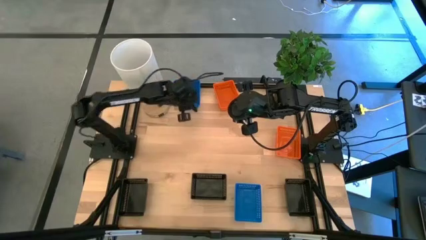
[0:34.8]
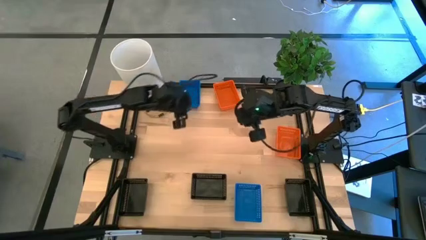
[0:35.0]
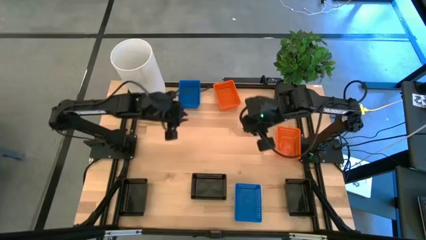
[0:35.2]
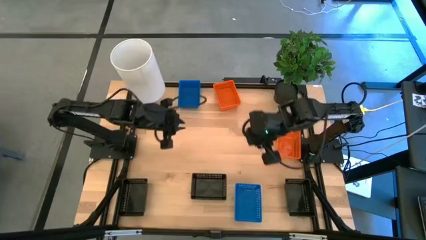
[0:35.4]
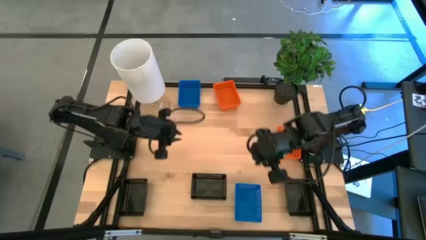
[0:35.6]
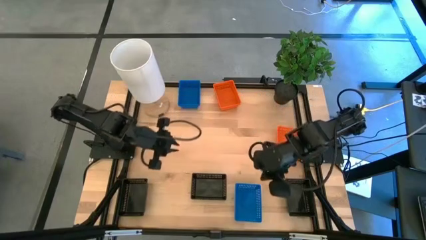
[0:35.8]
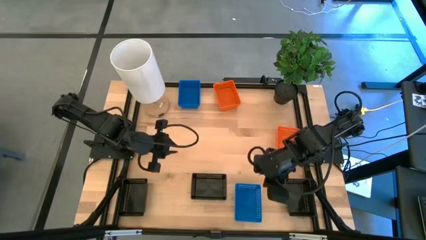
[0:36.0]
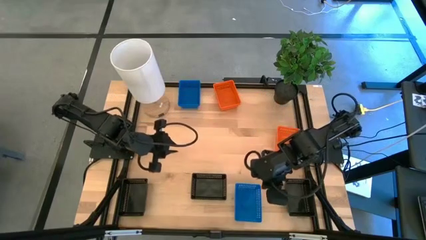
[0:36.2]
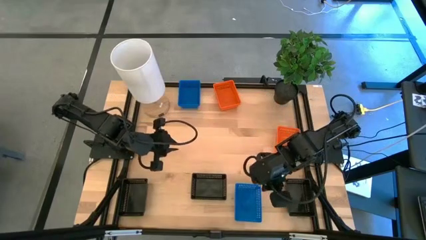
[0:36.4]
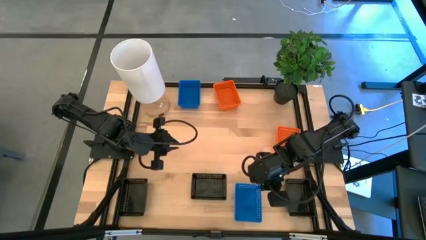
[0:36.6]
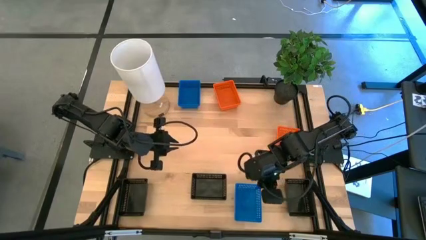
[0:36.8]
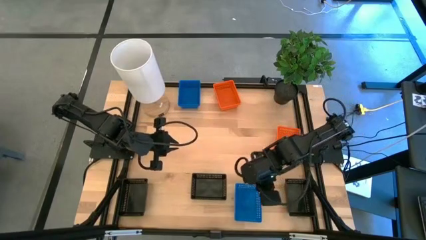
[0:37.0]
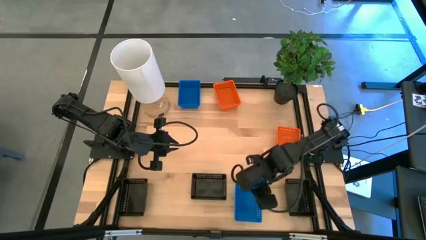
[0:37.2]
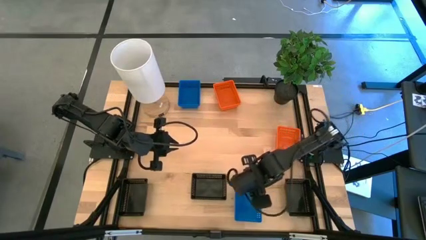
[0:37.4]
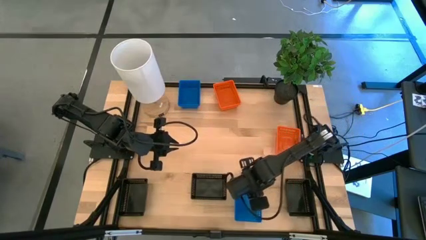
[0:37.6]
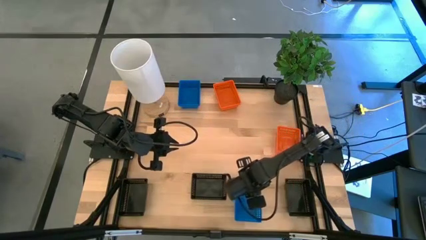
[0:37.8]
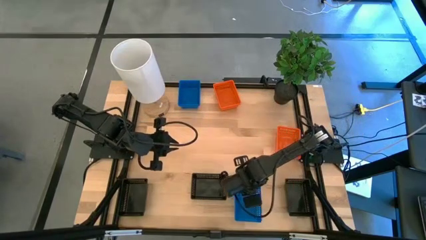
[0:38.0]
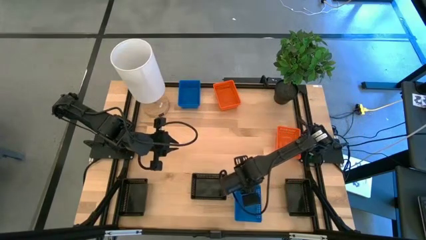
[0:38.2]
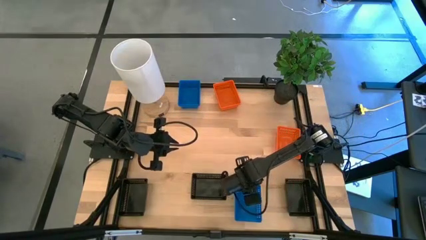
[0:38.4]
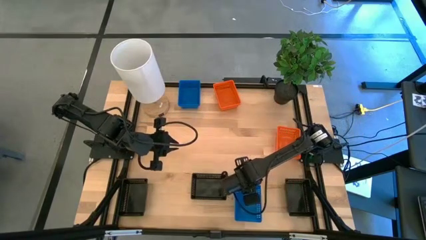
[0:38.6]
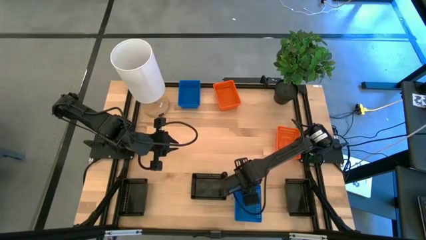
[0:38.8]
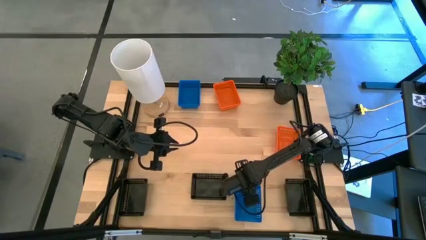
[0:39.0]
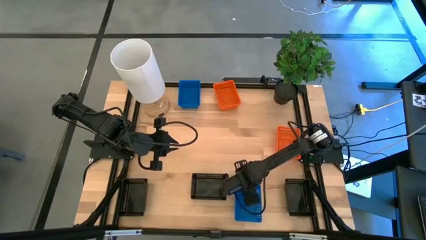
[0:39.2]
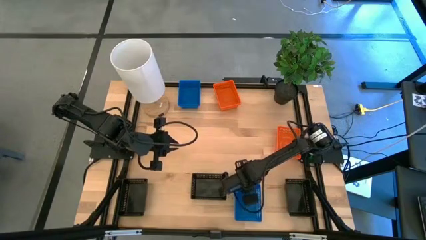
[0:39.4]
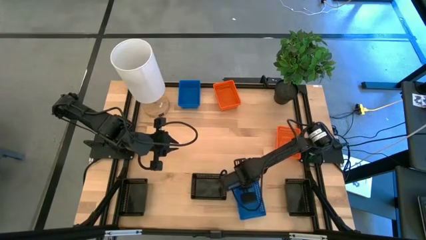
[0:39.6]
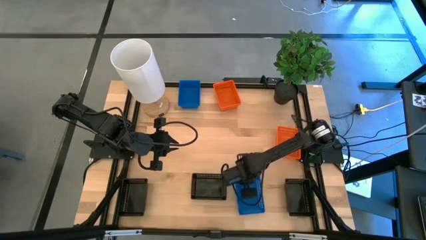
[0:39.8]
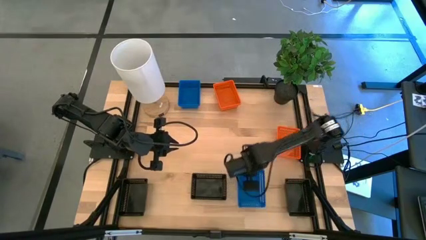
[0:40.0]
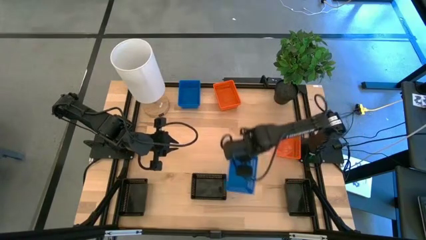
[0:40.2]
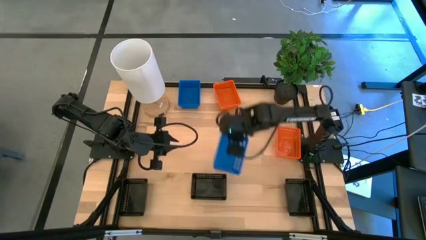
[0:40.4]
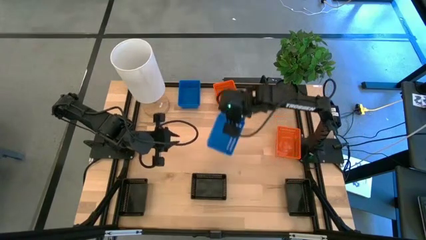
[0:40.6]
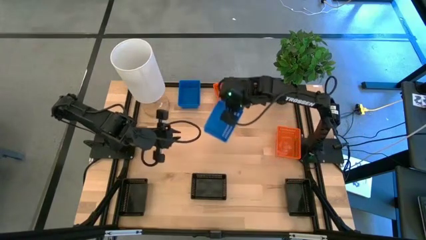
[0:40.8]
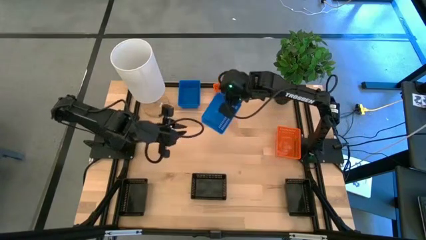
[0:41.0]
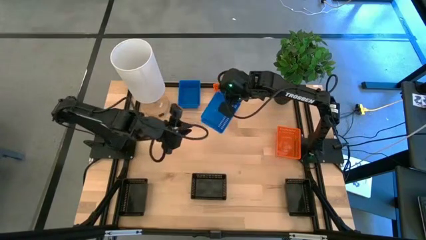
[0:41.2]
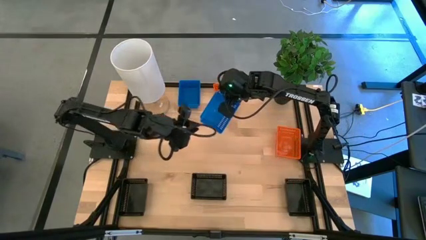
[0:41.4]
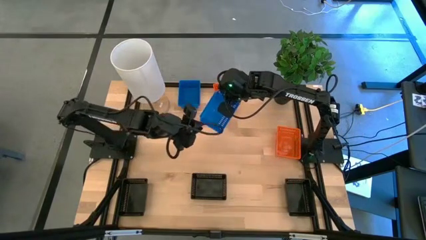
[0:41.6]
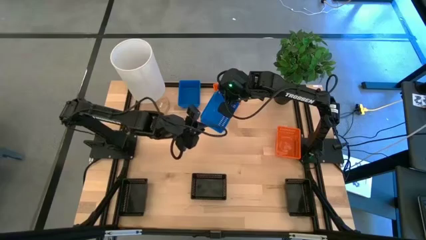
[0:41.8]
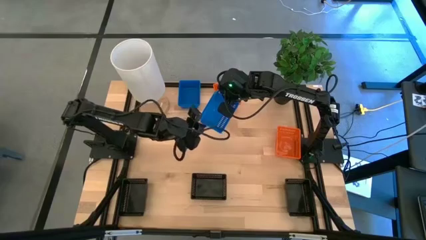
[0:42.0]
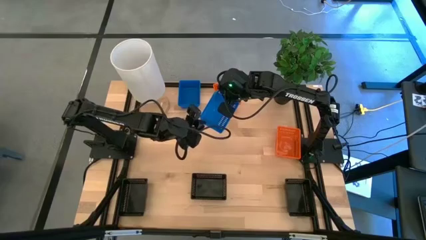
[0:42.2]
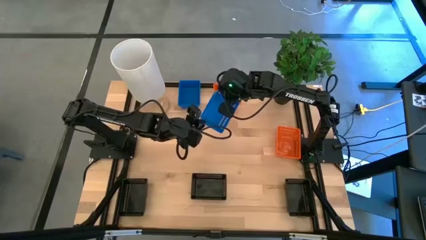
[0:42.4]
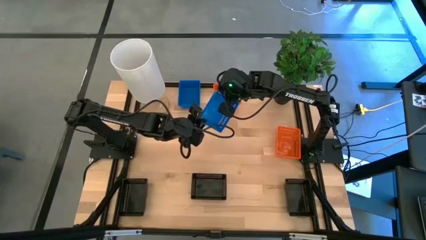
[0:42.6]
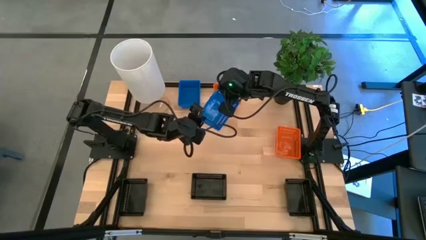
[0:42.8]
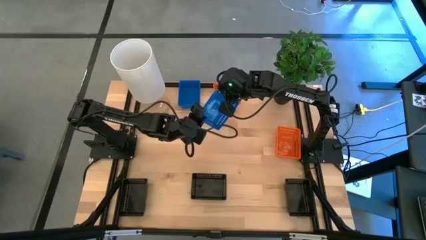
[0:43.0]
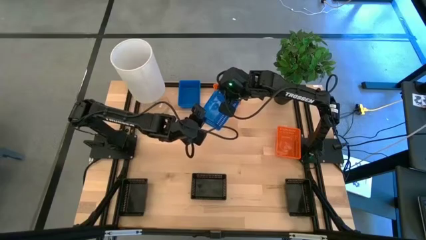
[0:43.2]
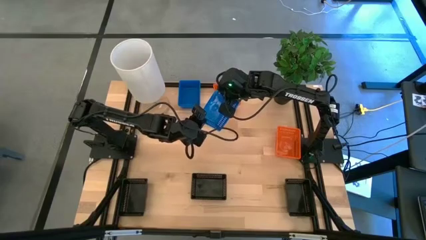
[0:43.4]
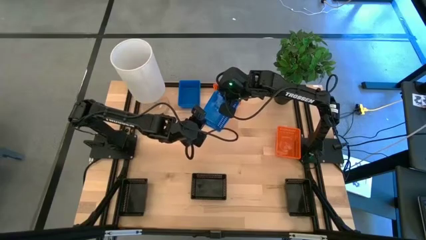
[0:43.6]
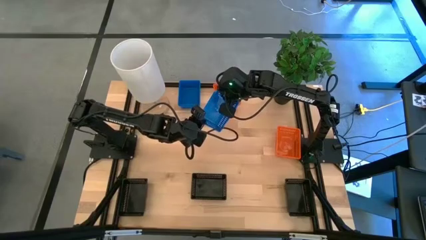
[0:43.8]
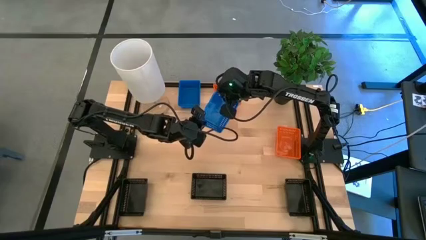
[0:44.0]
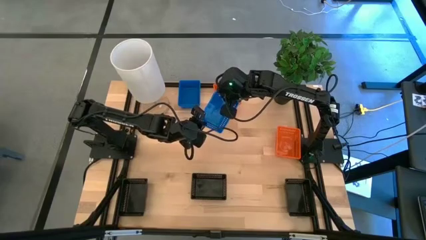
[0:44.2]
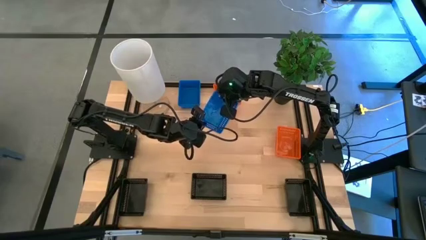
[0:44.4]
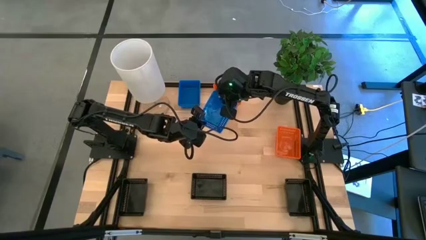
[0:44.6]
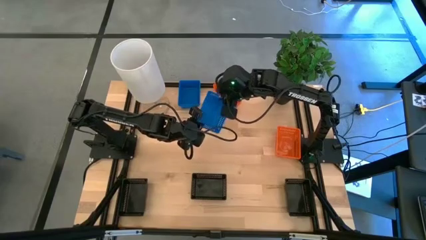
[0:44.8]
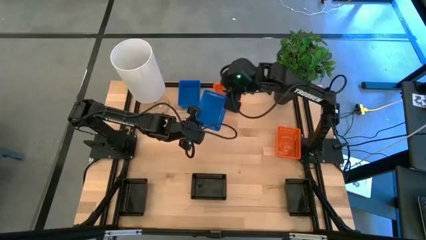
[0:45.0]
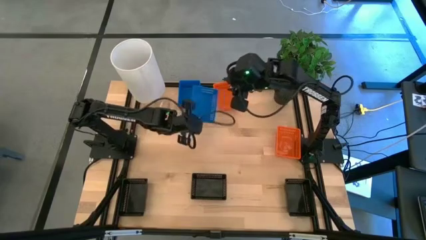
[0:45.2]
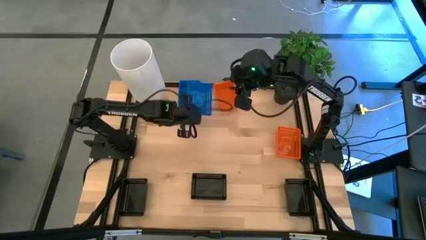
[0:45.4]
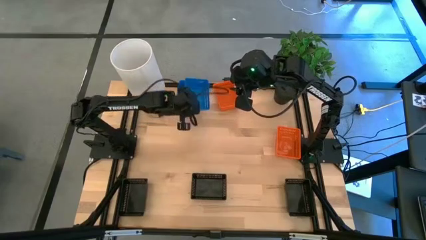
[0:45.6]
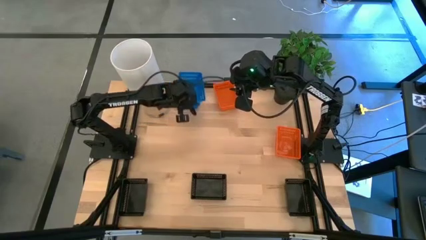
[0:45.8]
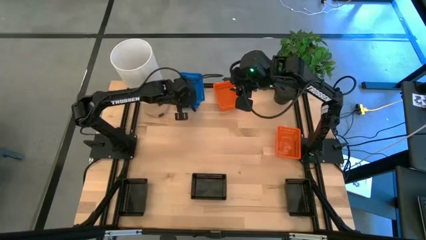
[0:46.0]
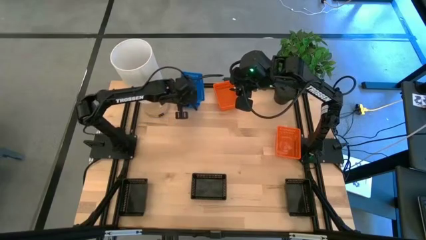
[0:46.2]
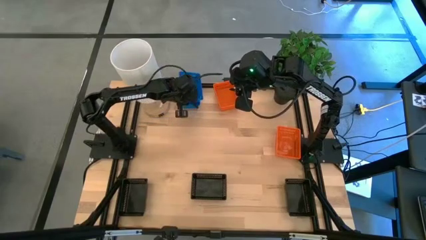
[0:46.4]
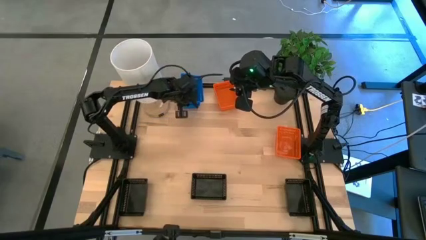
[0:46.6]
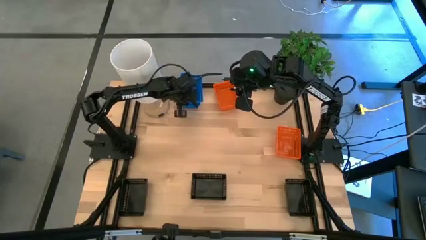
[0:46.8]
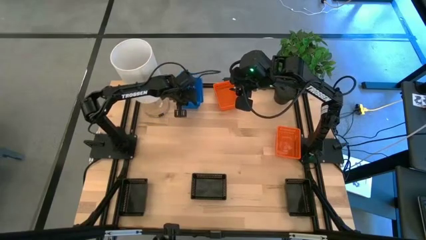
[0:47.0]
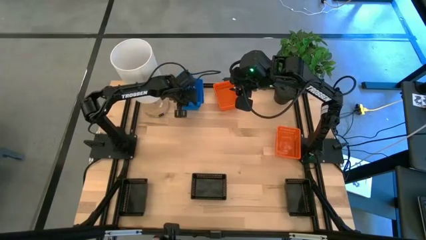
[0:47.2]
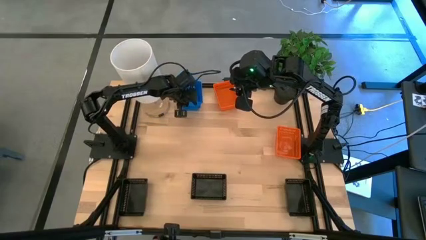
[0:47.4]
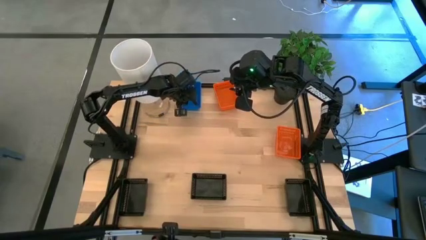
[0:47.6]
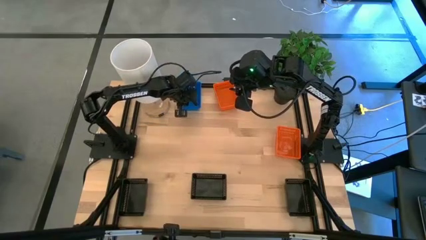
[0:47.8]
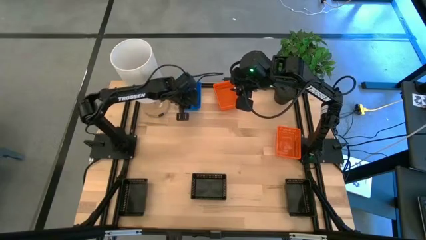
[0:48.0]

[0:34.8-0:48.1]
Stack the blue basket on top of the blue basket on the table
